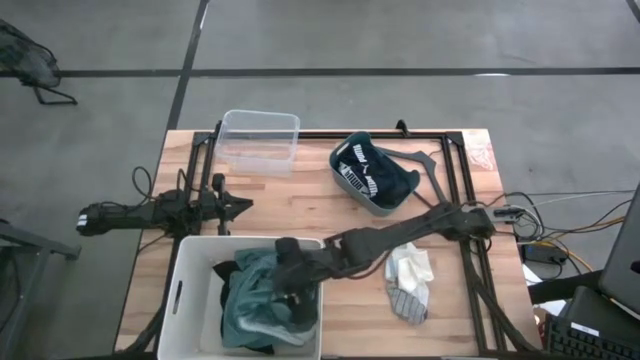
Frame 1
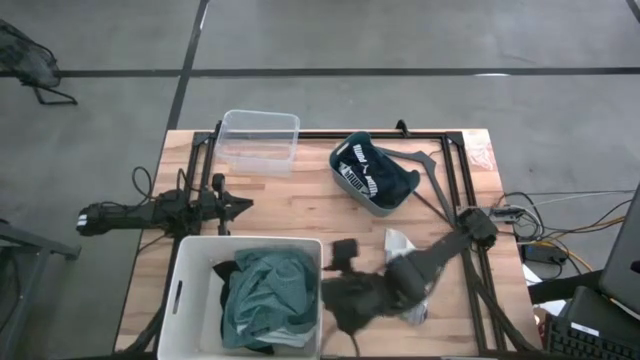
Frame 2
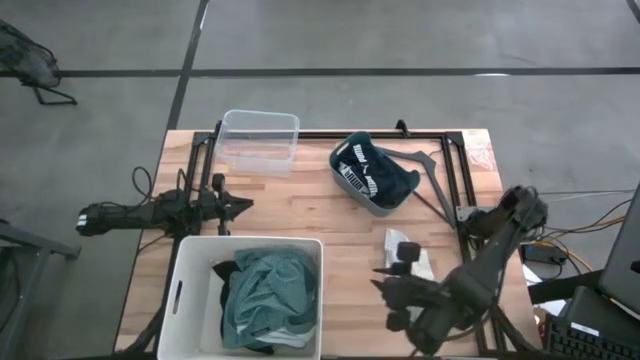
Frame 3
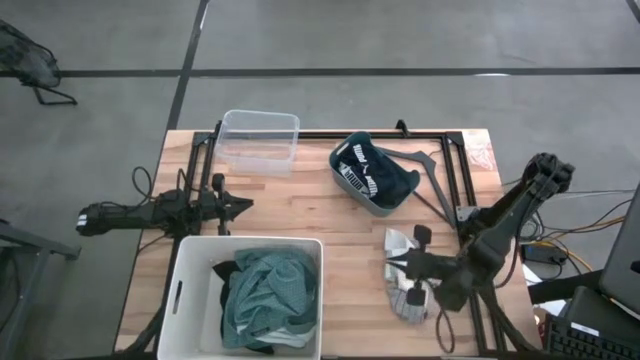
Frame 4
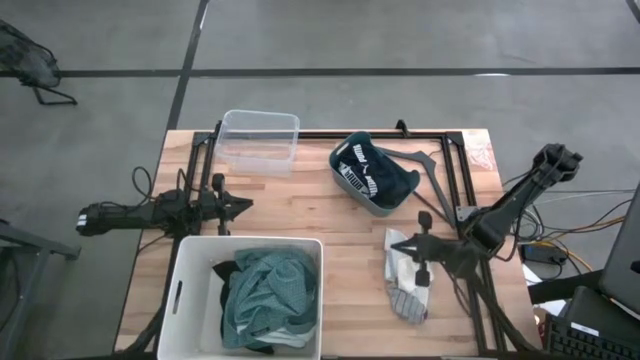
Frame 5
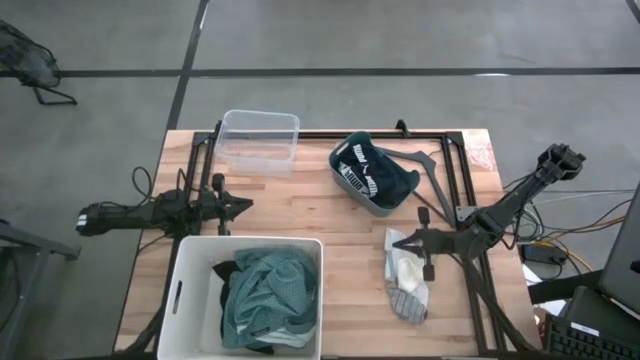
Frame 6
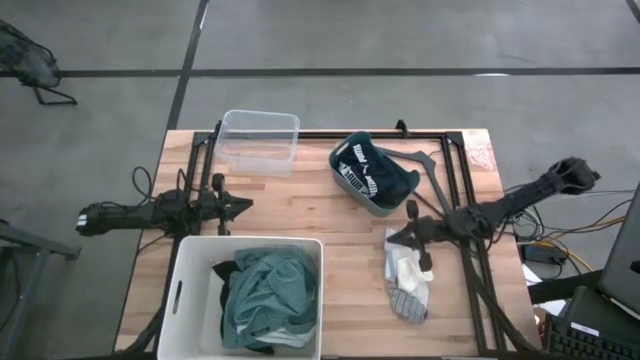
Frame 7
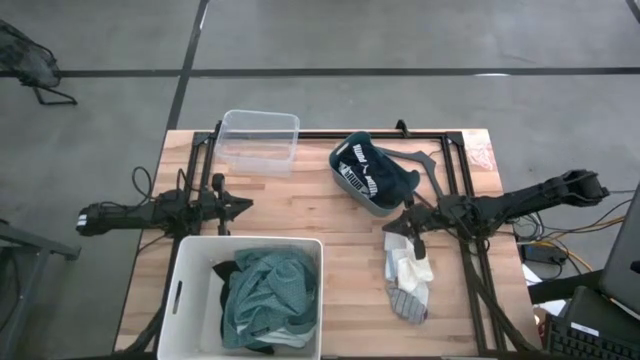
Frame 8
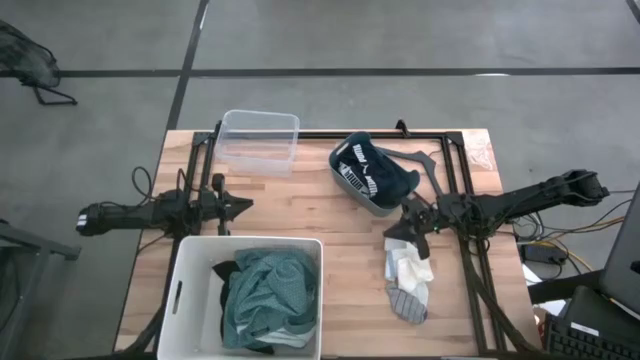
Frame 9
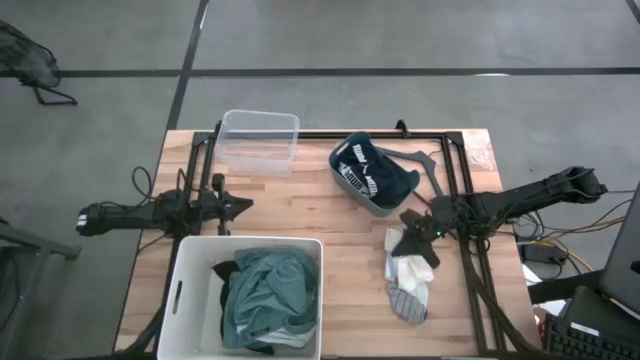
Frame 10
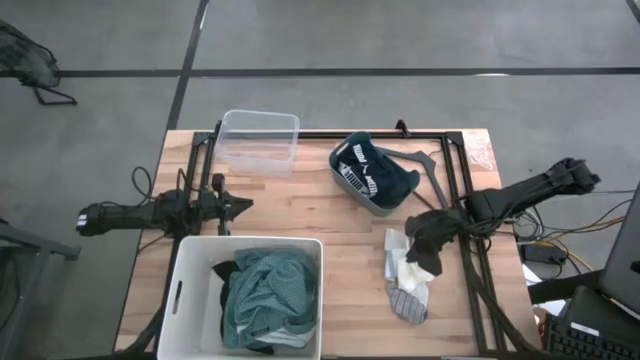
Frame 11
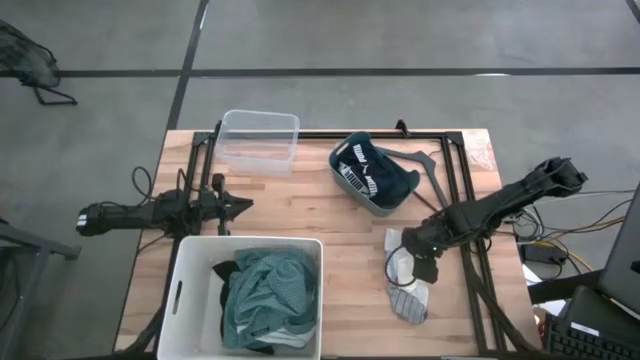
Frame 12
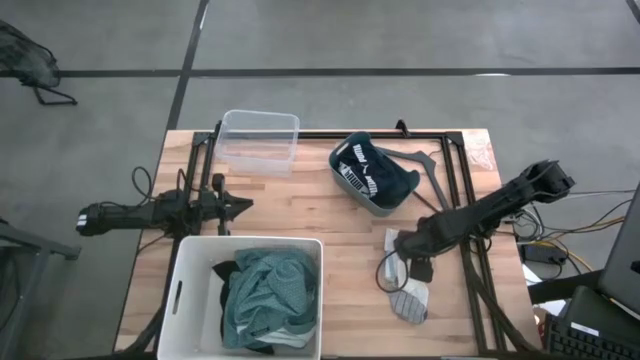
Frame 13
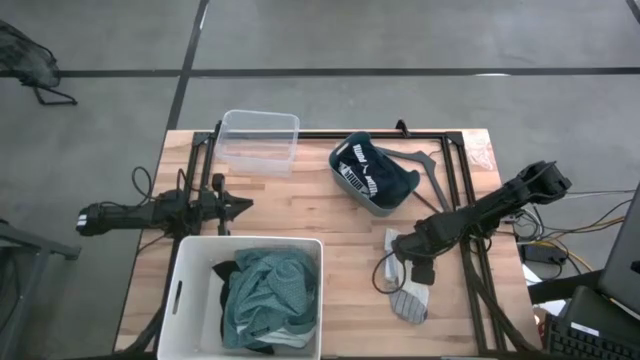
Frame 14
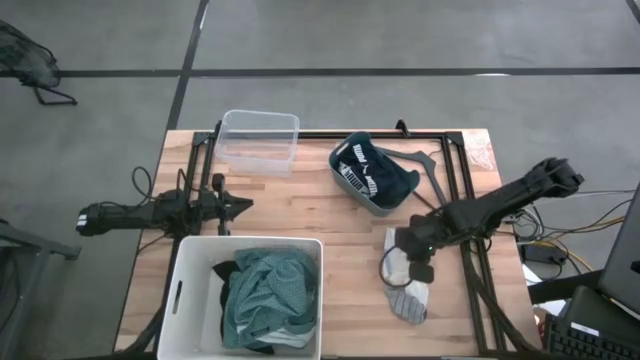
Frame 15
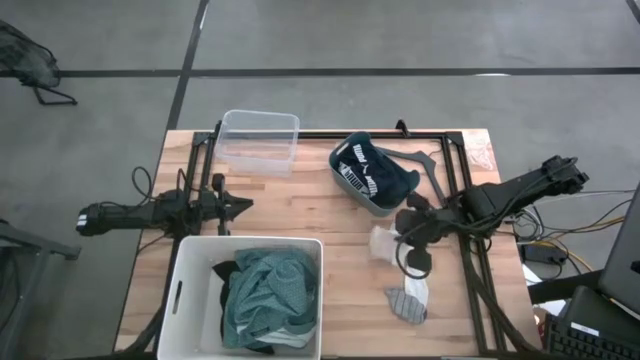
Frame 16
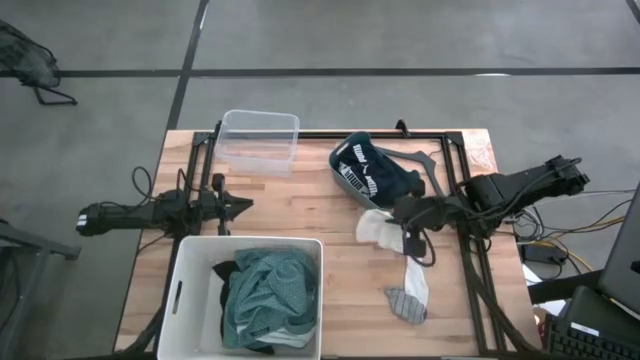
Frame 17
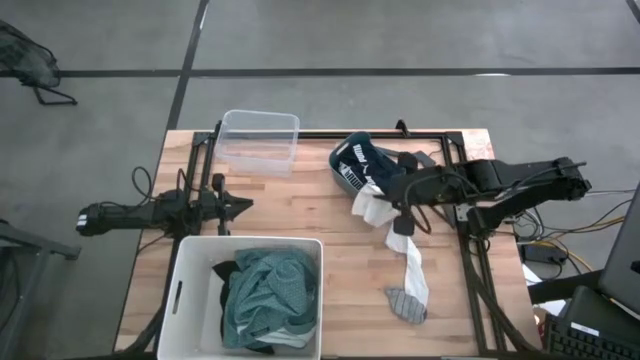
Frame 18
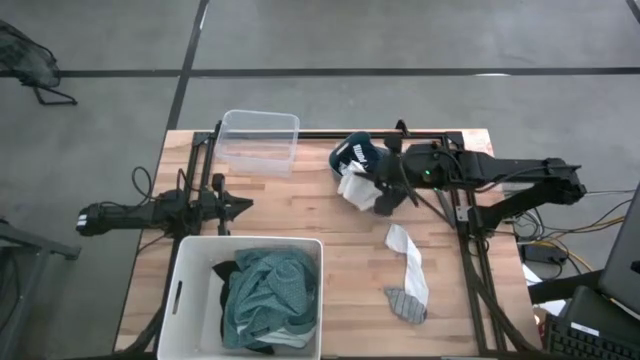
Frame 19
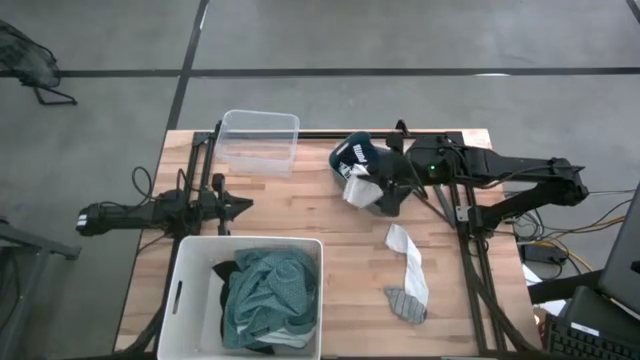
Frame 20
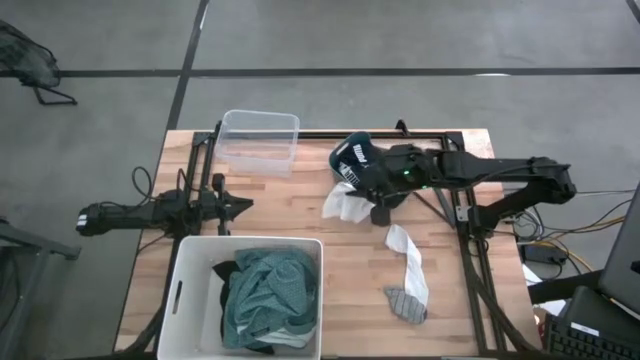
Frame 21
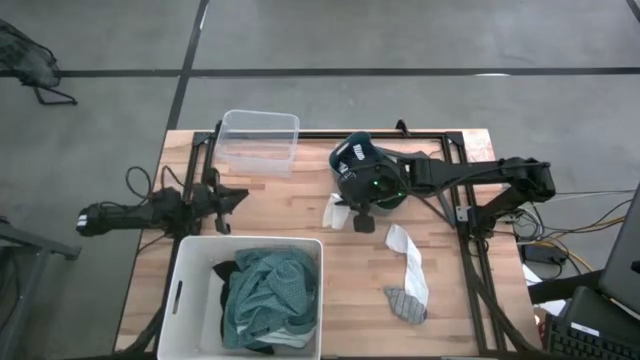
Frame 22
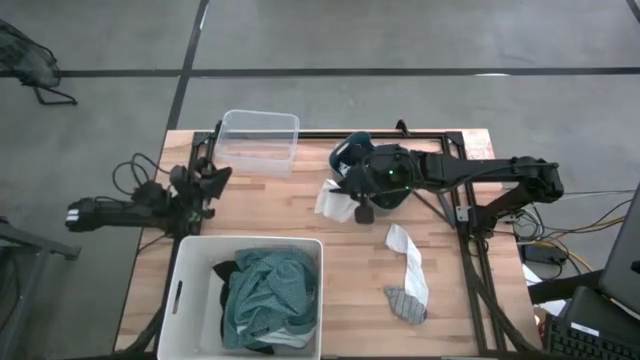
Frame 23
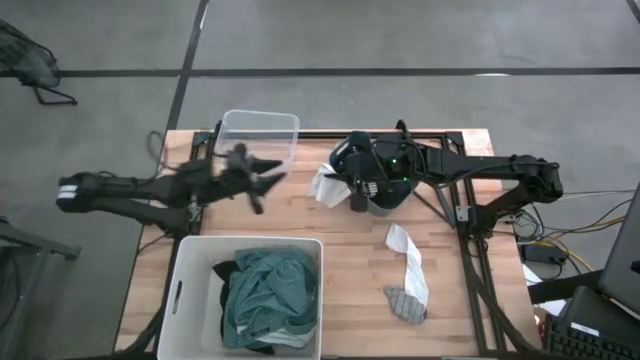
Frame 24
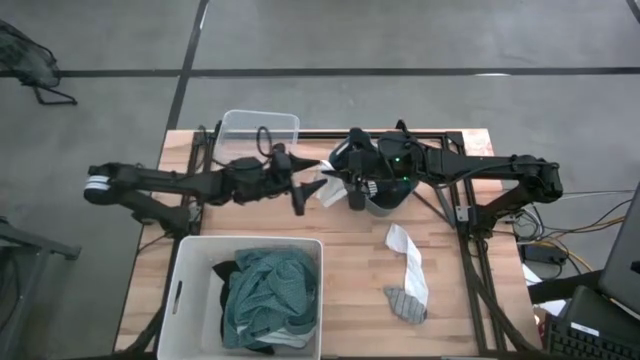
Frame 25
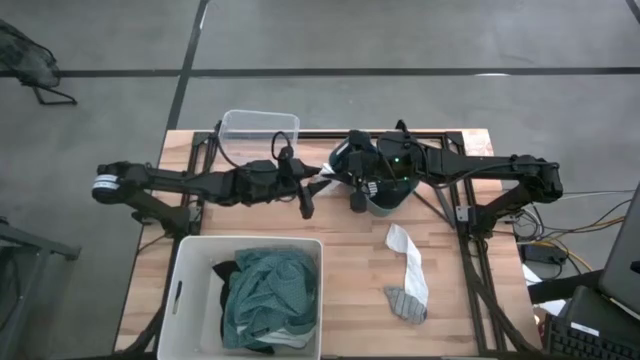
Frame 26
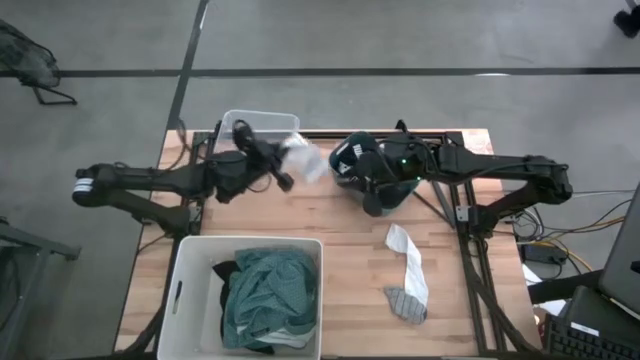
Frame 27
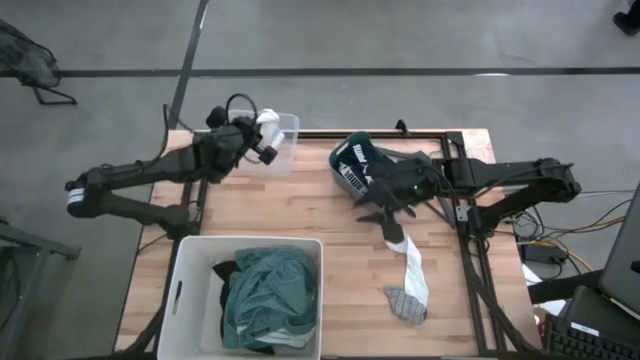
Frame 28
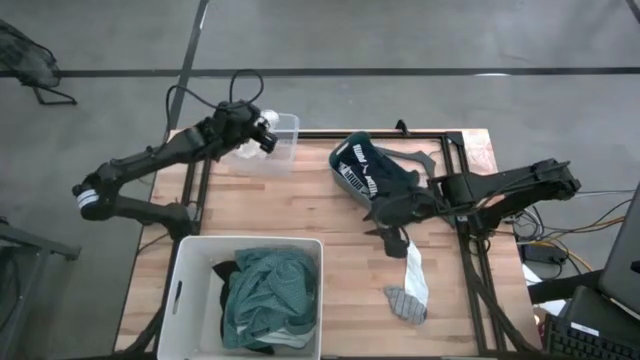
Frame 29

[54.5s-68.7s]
Task: Pick & Place Cloths
Put the top white sock into the transparent bin

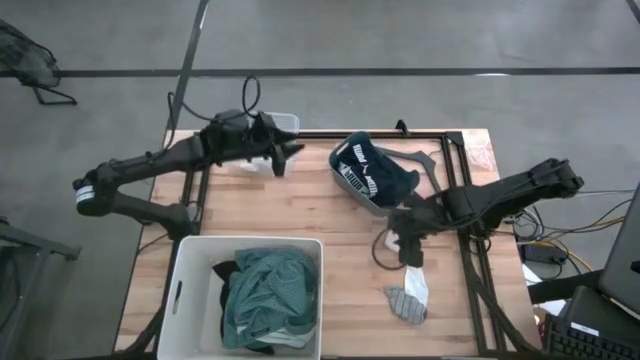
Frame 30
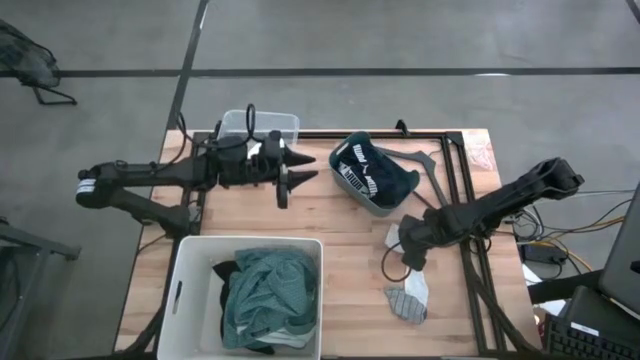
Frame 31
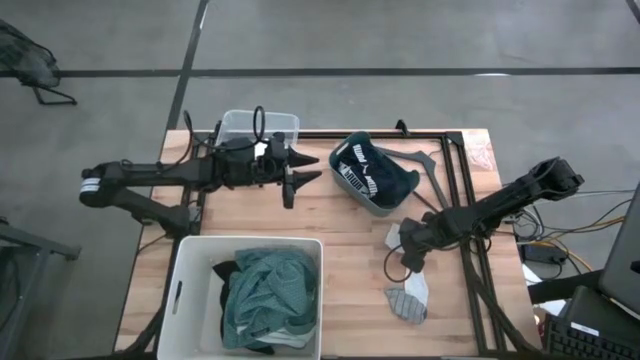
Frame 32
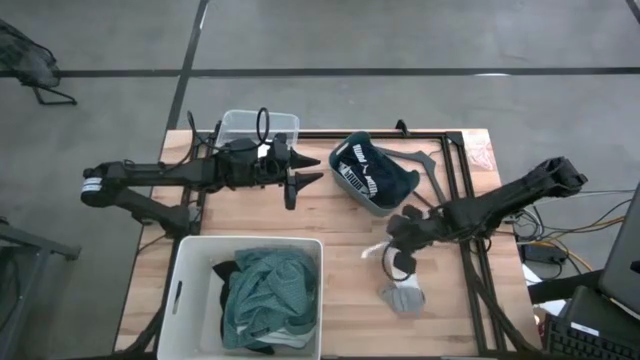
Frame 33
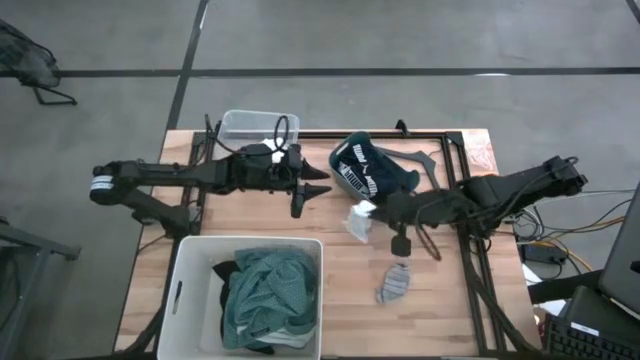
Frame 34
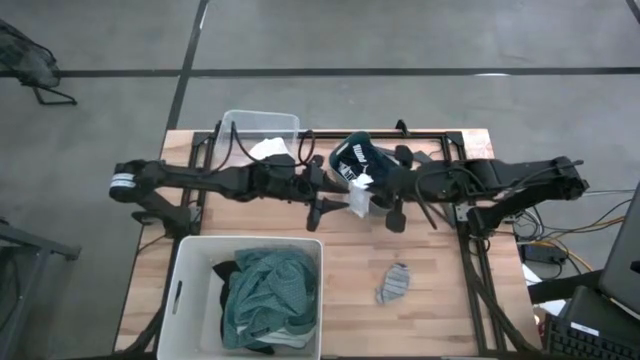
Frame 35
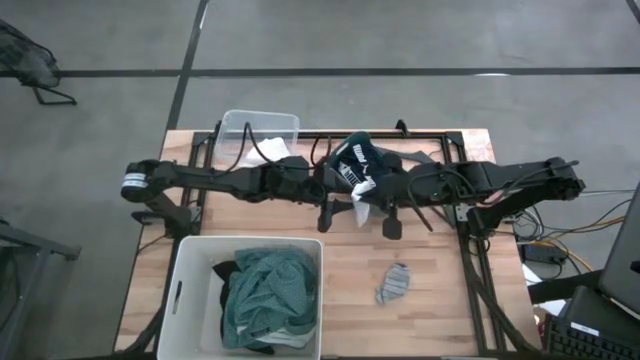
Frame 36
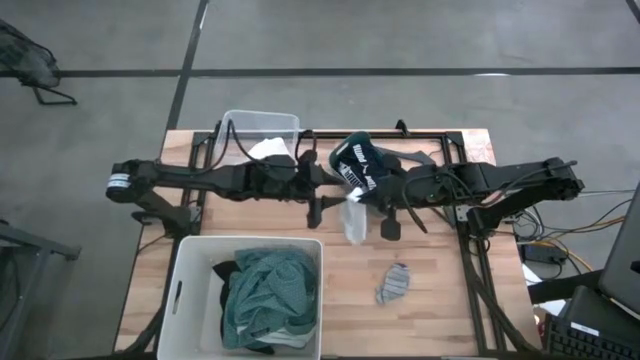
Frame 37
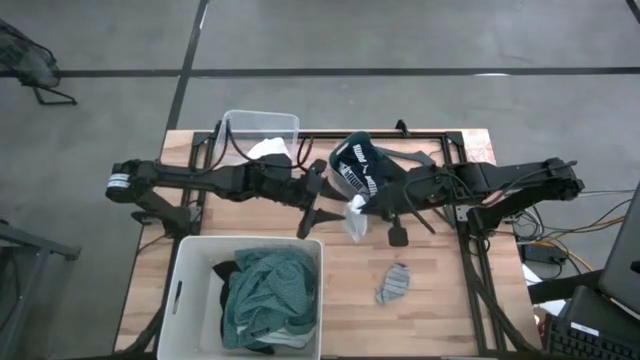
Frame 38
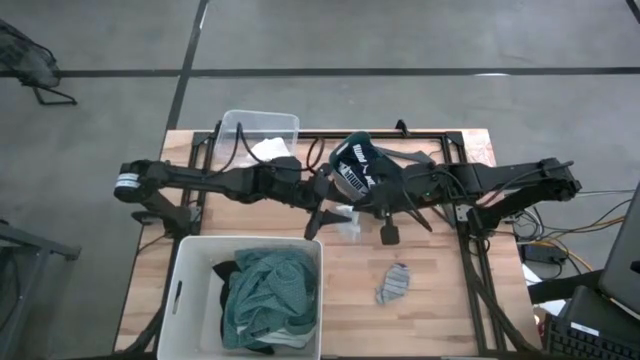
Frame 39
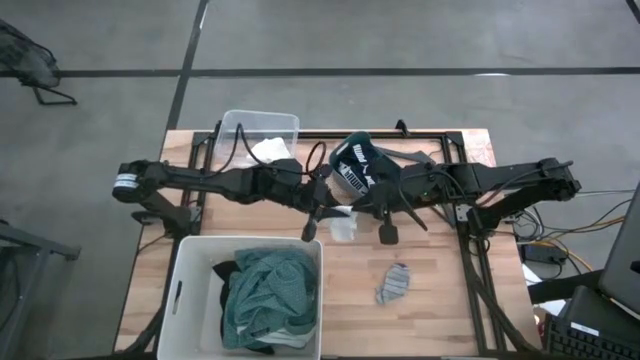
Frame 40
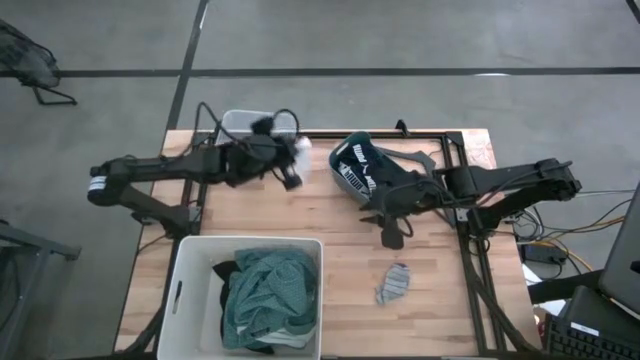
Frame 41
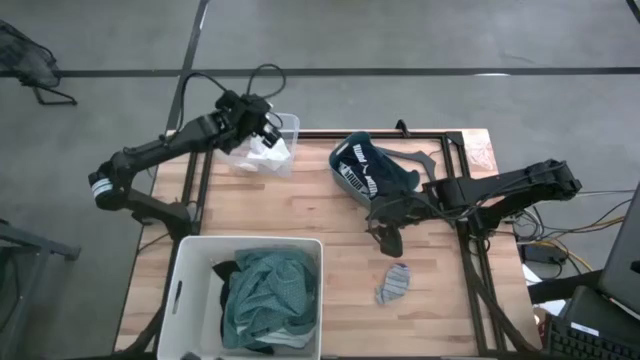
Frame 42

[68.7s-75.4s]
Put the white sock into the transparent bin
